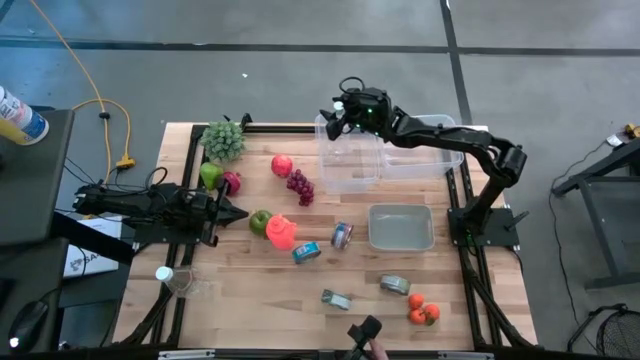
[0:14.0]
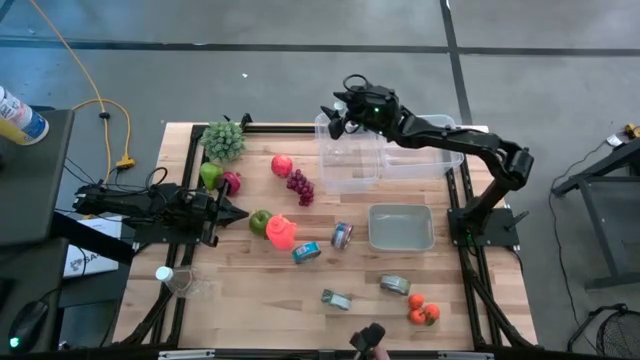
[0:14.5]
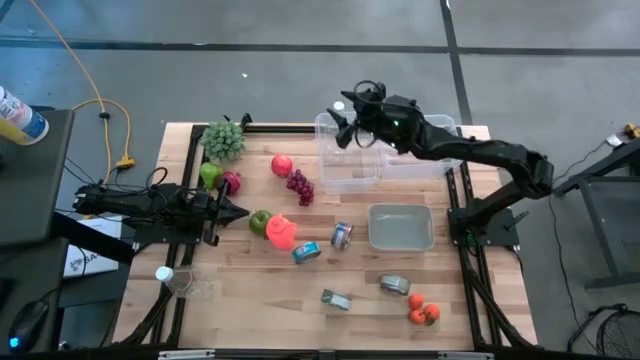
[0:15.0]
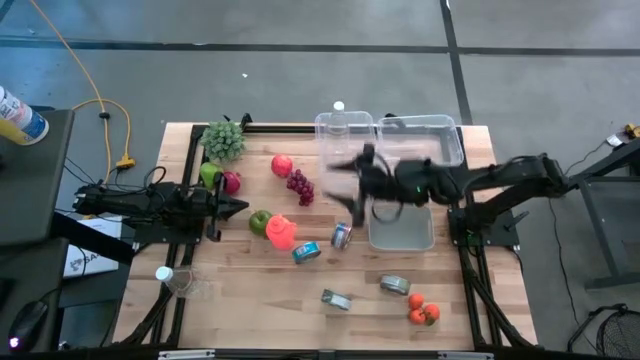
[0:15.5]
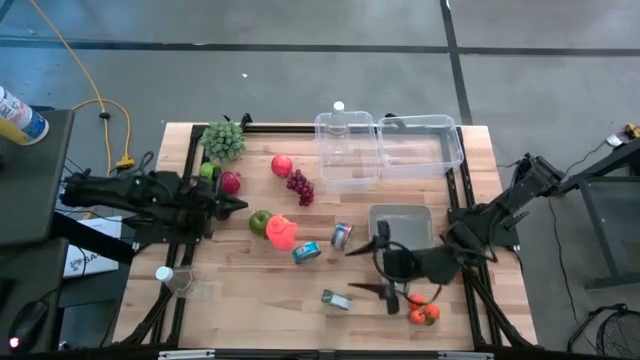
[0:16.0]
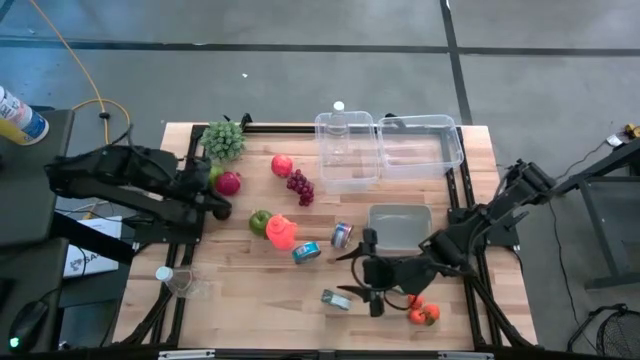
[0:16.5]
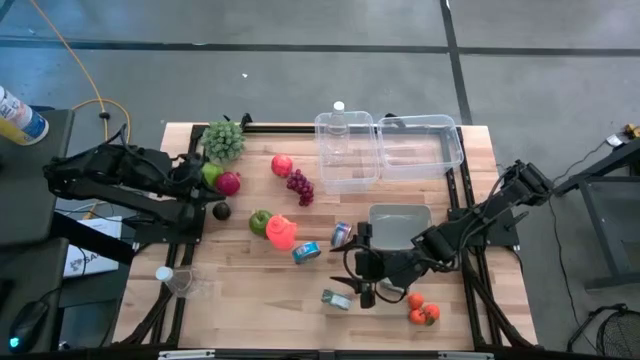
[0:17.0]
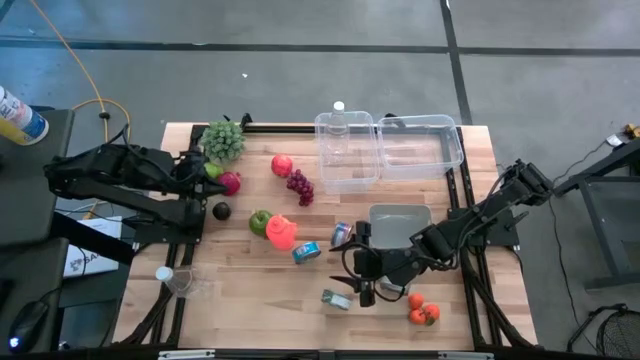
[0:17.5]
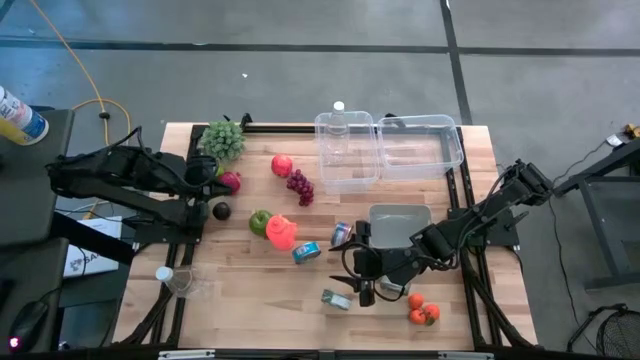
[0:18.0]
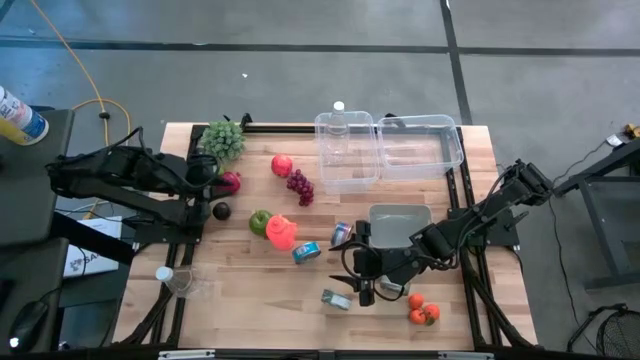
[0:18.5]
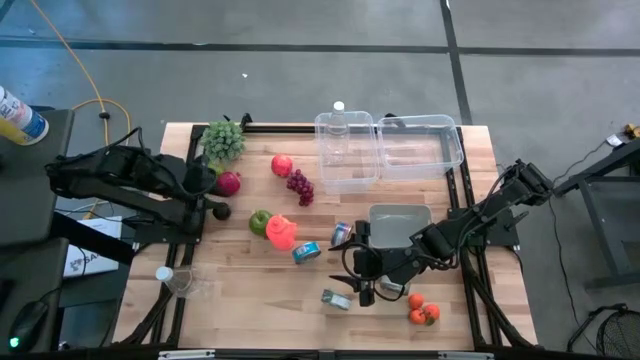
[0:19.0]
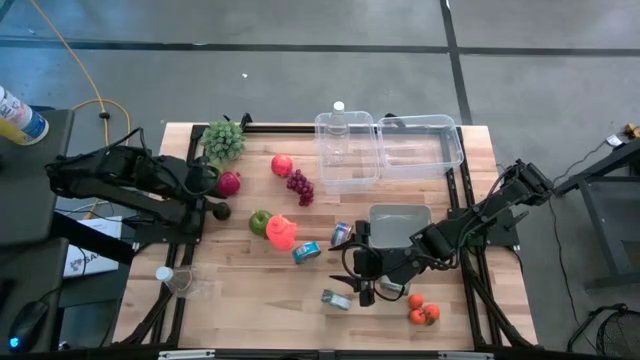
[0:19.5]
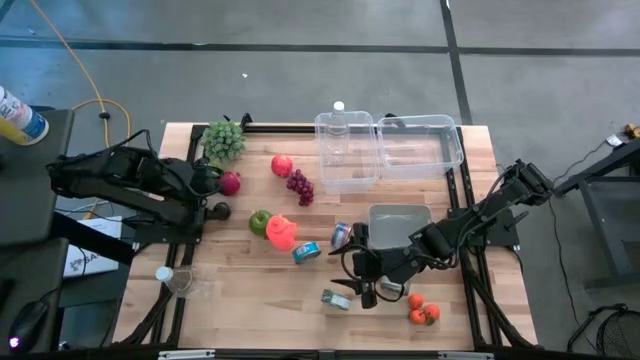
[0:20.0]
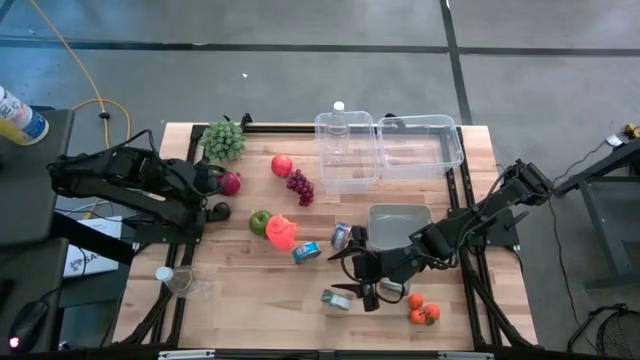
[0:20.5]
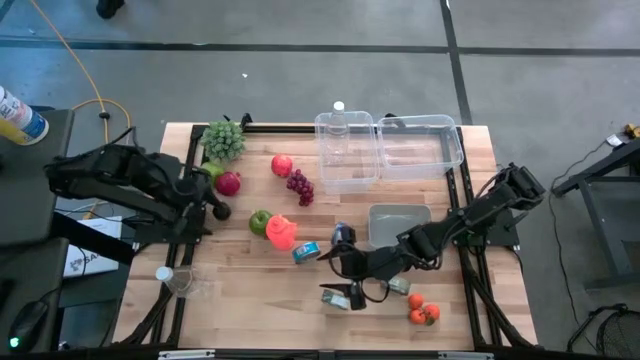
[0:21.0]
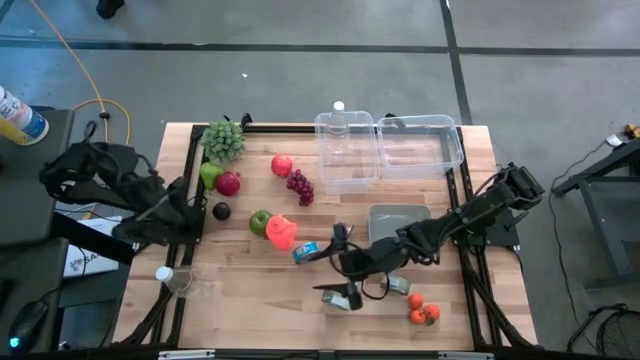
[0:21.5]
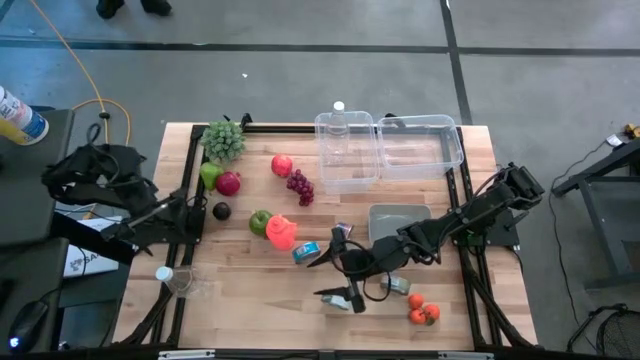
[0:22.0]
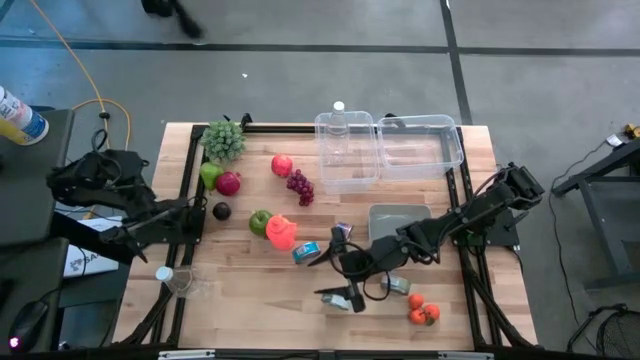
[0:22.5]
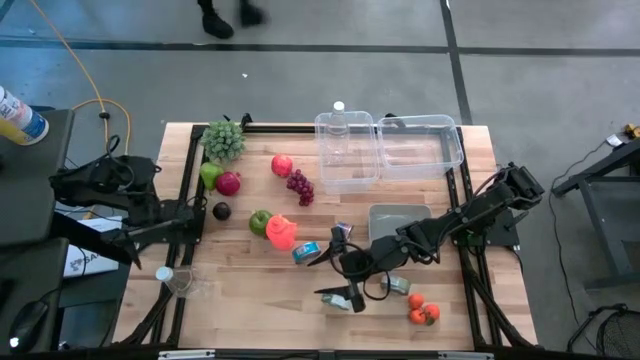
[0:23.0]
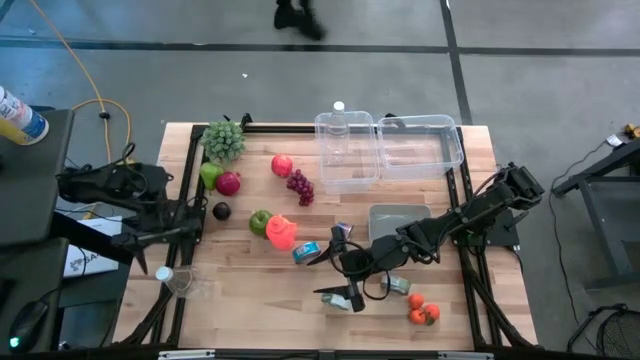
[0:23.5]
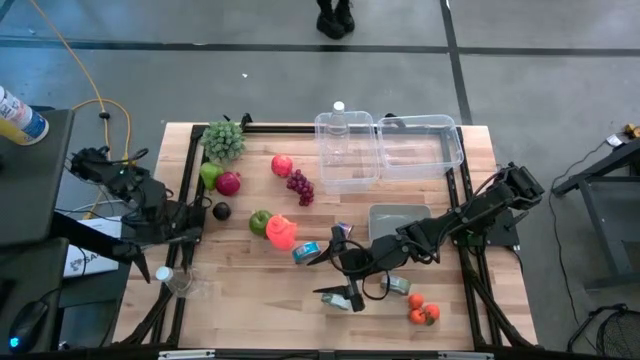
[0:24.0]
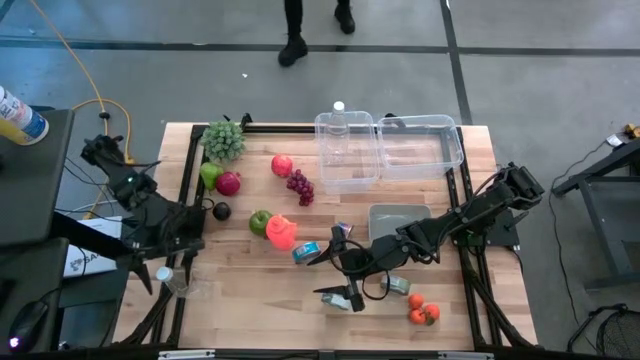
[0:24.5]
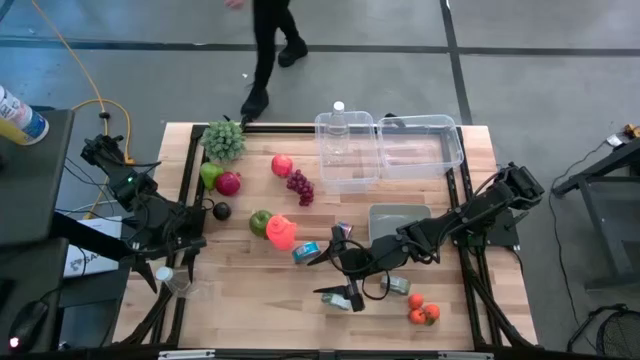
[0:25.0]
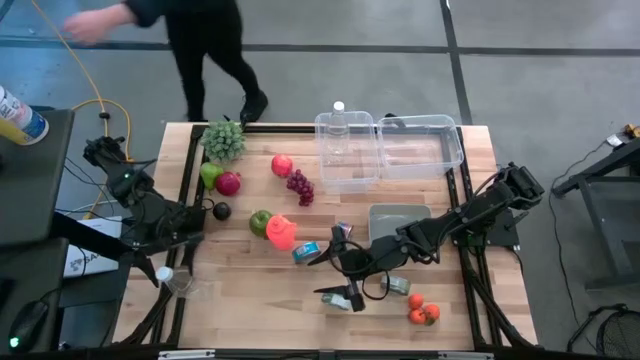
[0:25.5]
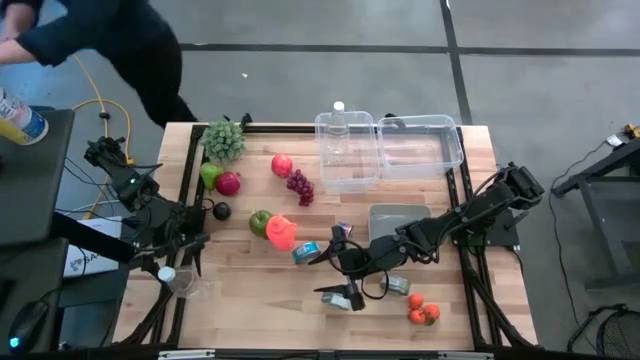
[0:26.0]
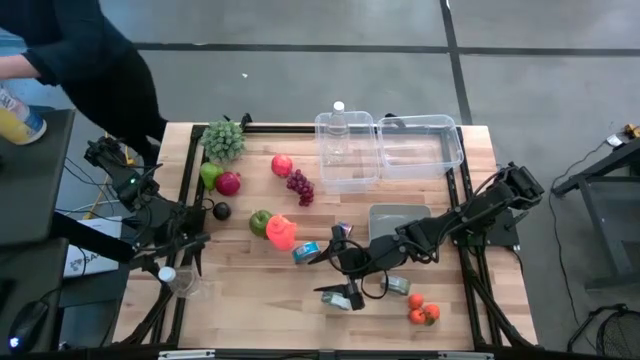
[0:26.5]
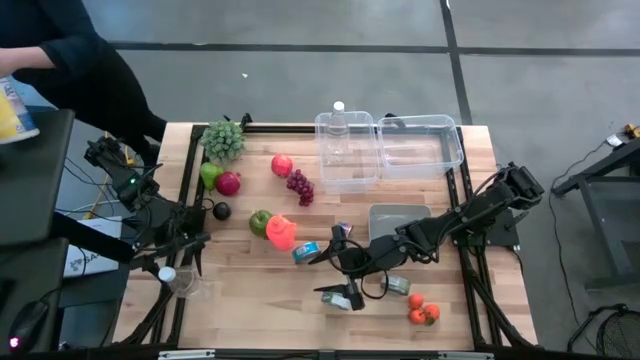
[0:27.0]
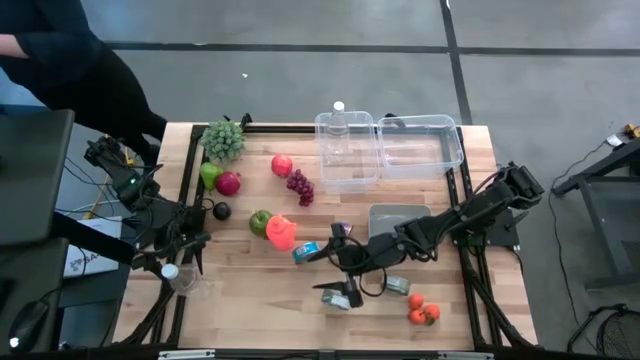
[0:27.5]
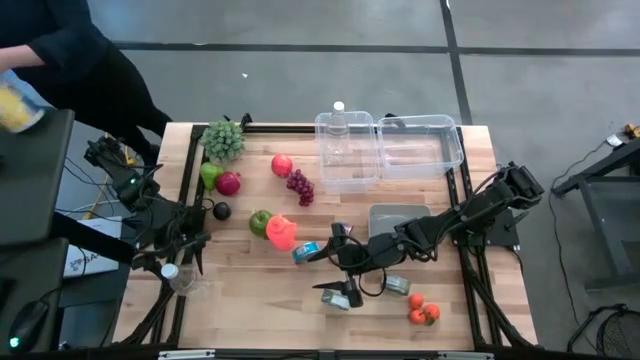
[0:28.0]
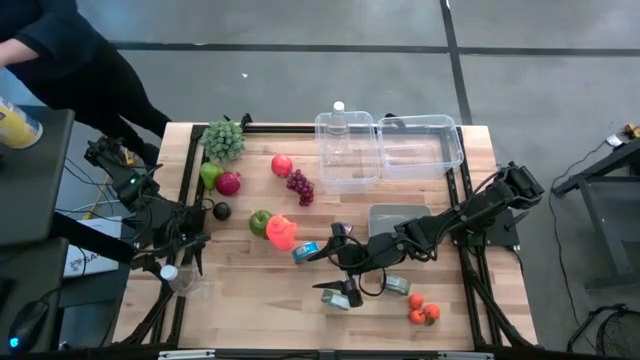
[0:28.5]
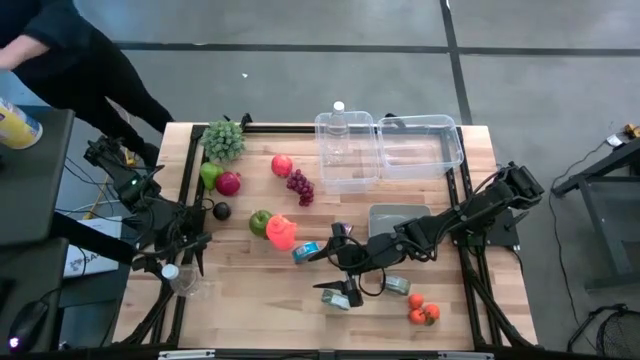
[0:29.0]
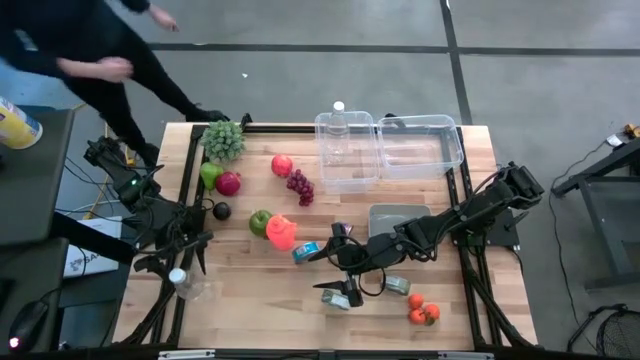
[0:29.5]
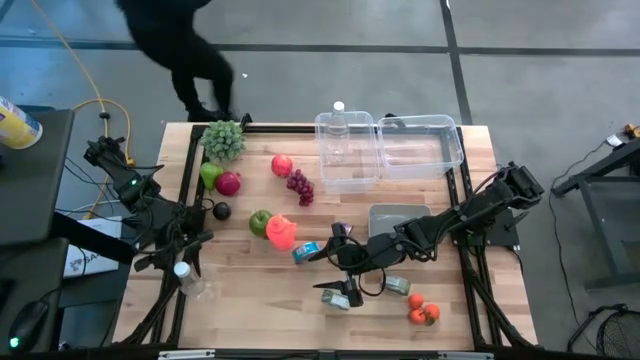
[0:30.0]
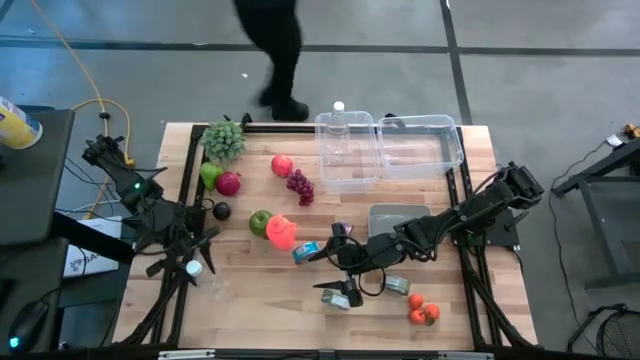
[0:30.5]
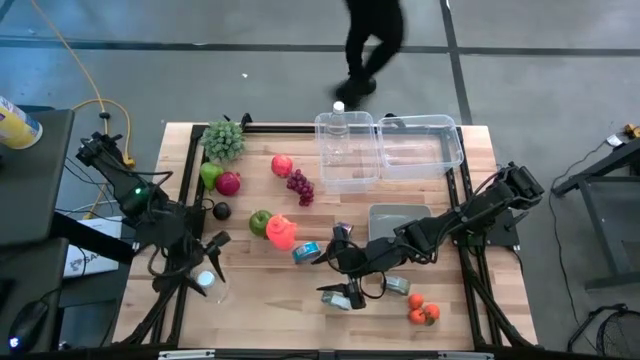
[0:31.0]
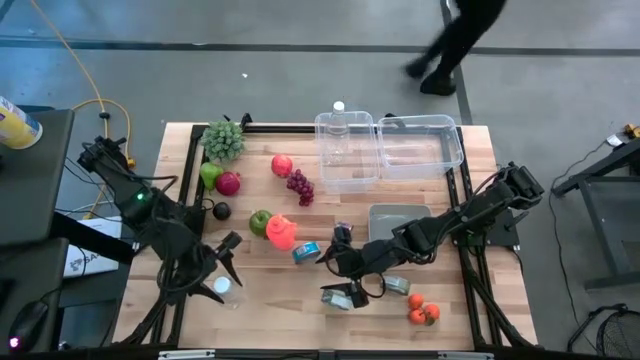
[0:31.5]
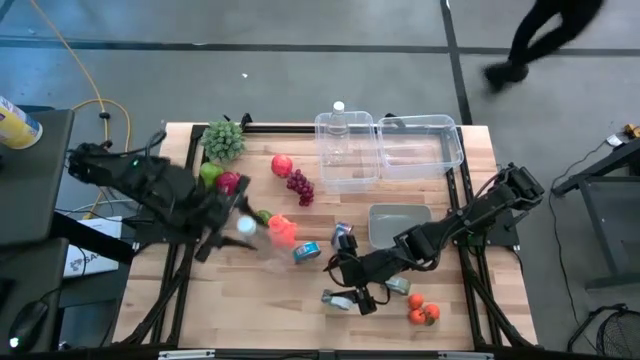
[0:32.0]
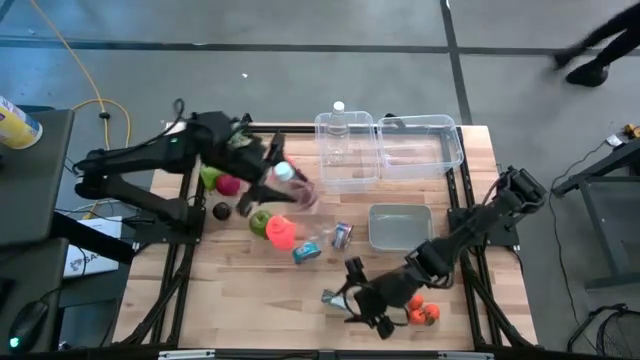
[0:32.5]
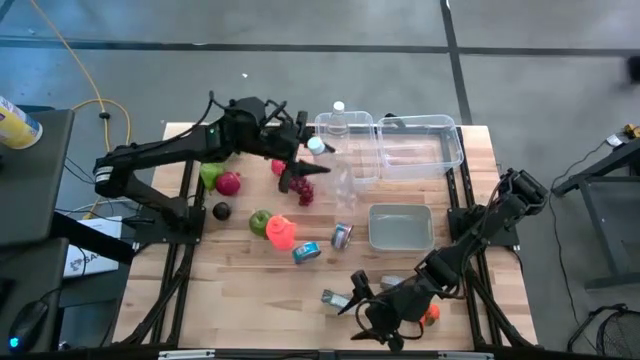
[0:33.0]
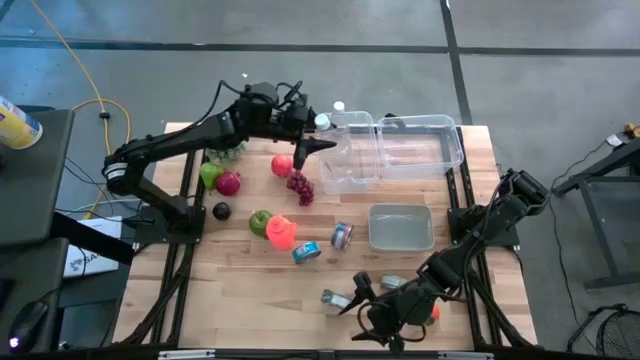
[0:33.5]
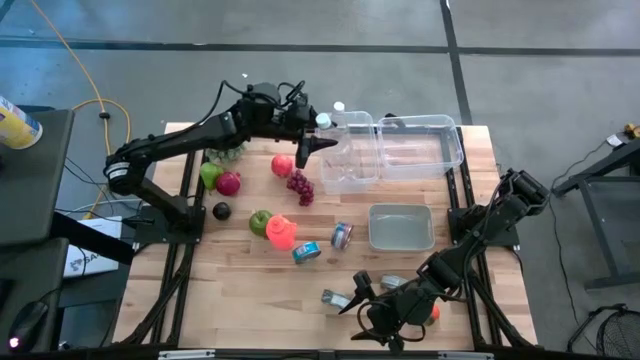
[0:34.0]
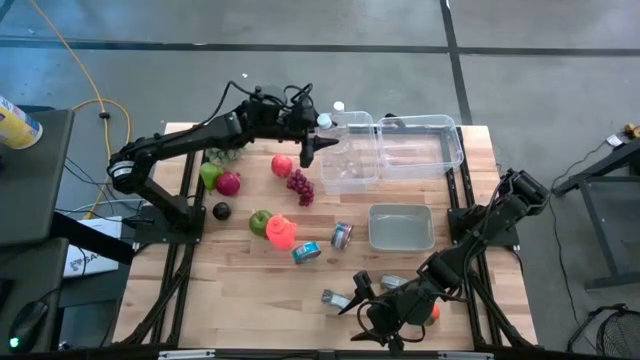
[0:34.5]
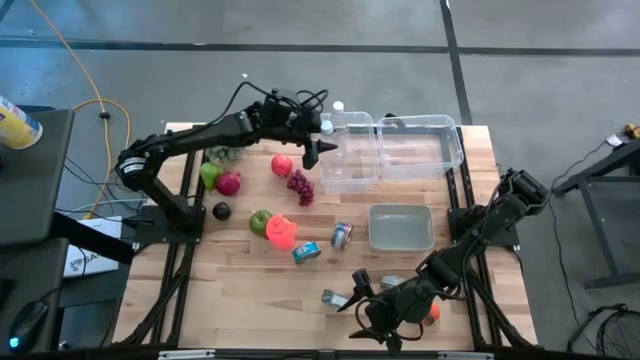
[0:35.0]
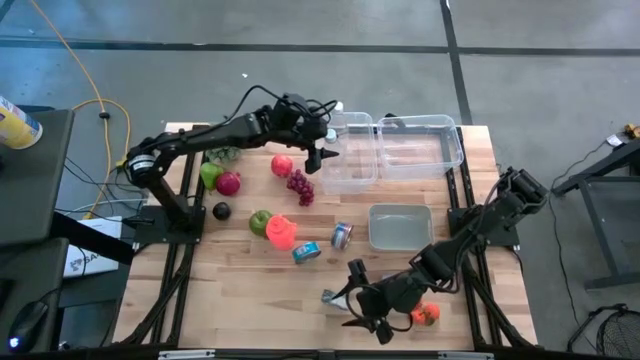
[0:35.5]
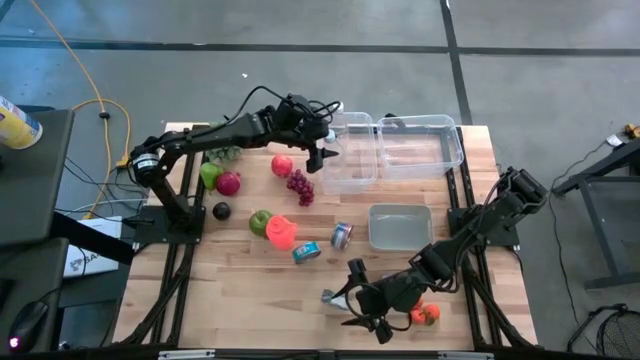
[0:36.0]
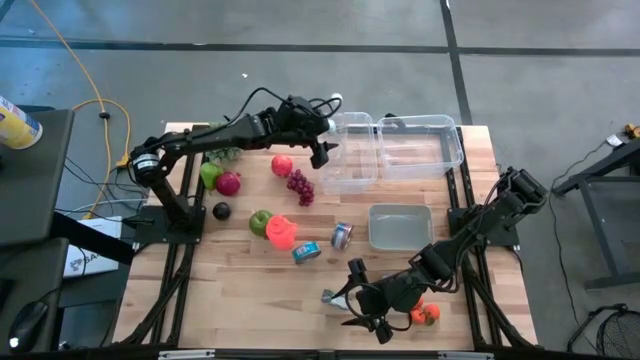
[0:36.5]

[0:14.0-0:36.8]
Task: Pick & Place Food Item
Put the transparent water bottle into the left transparent bin
